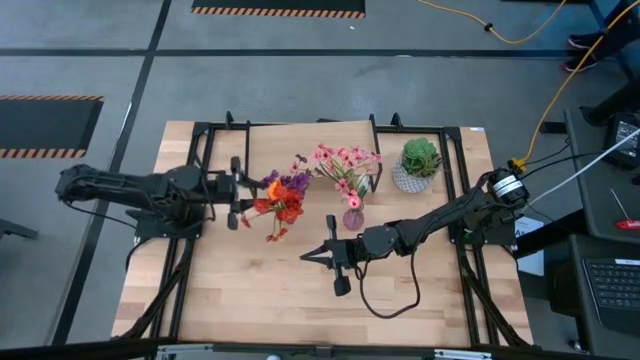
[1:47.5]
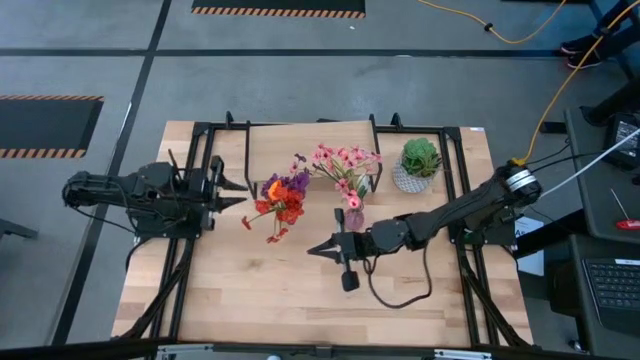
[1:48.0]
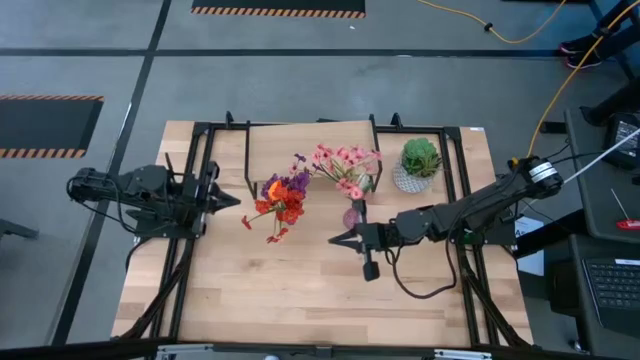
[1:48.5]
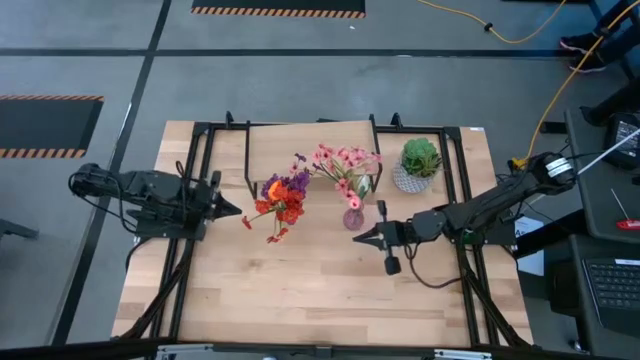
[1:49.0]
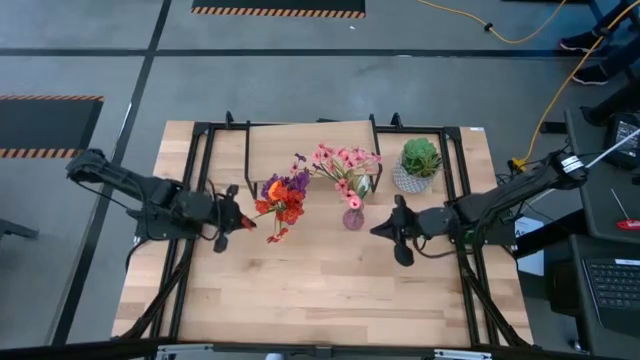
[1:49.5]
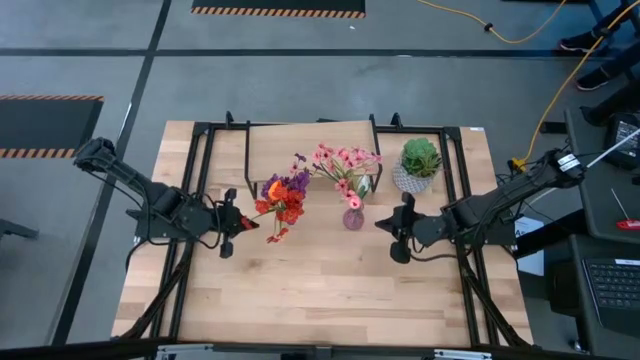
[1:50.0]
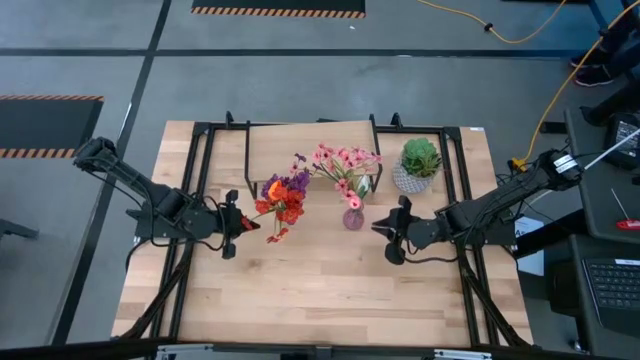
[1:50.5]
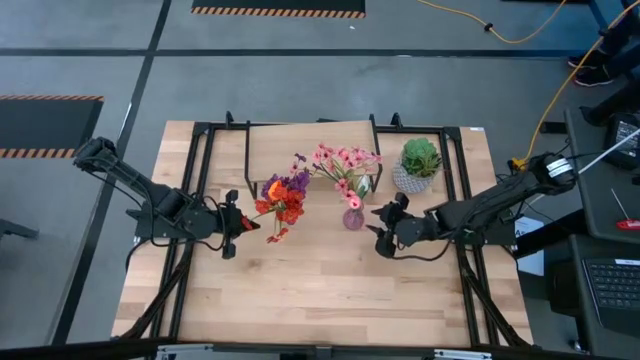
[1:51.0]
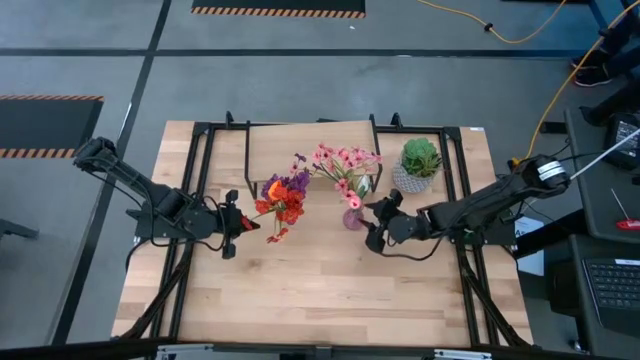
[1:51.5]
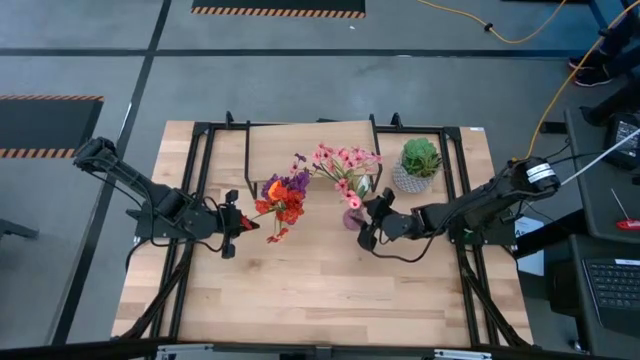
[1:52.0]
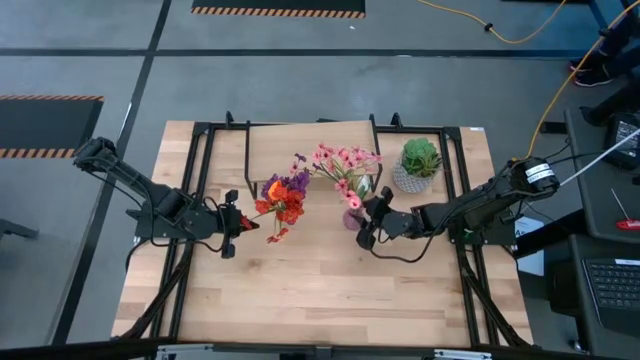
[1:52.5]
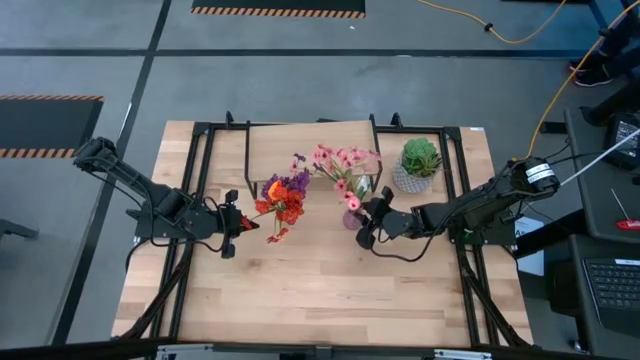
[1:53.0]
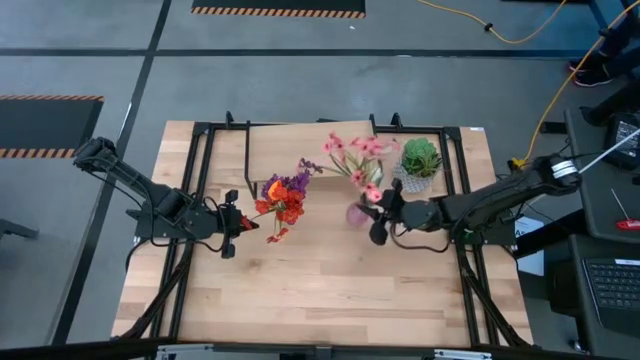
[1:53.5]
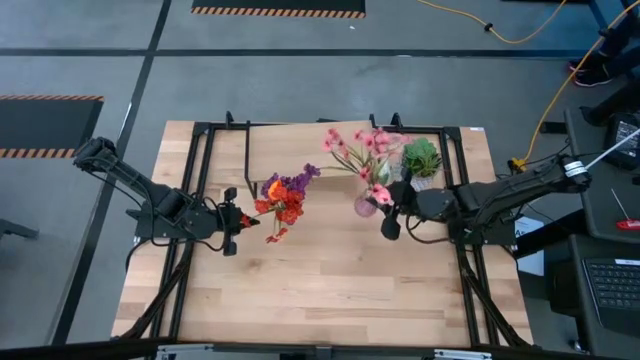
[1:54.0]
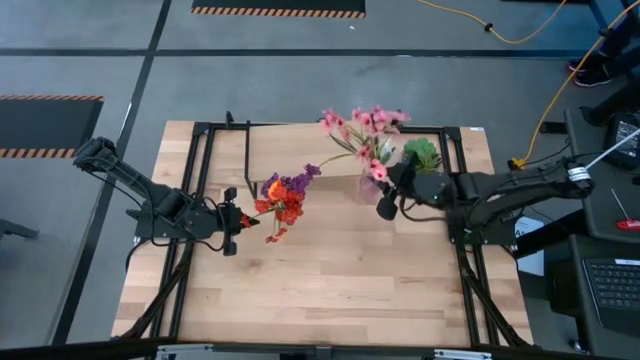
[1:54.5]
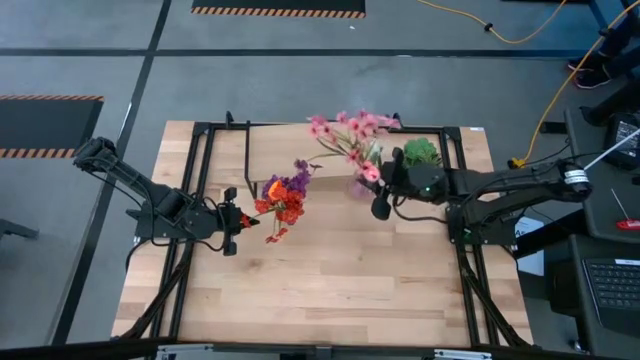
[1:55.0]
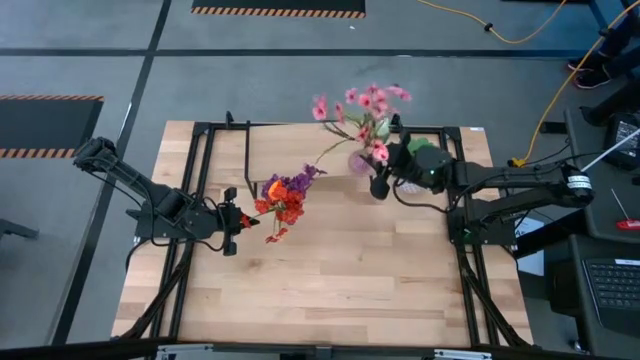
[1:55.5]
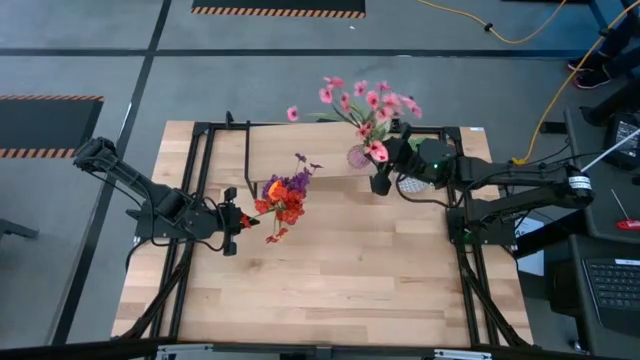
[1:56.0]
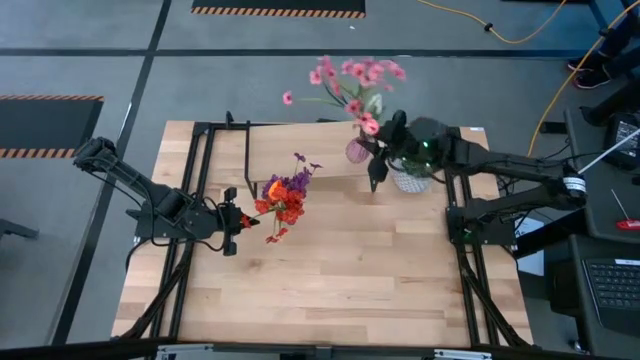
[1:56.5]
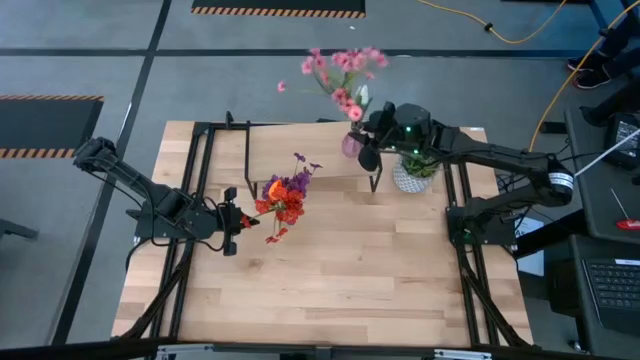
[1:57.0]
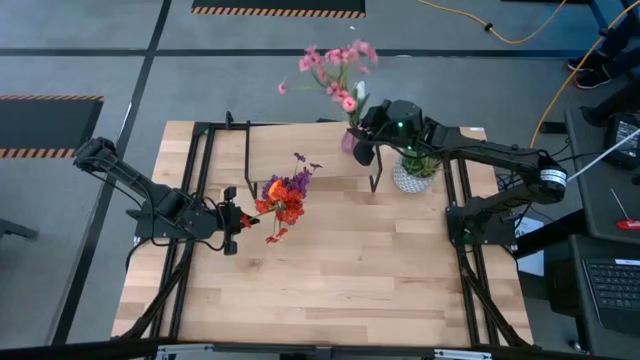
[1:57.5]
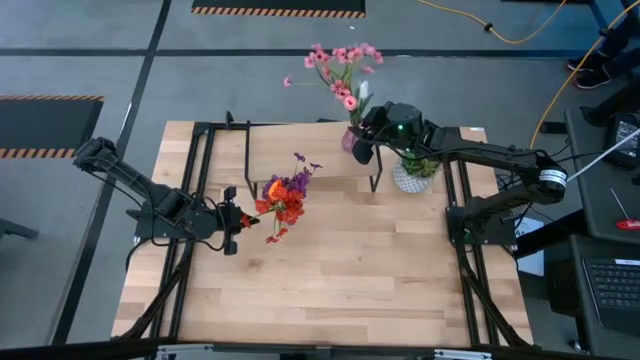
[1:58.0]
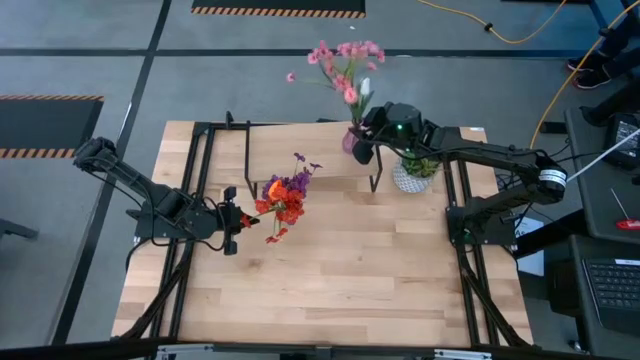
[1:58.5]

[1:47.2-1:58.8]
Task: Pick and place flowers into a vace then onto a shelf
Put the pink vase on the shelf

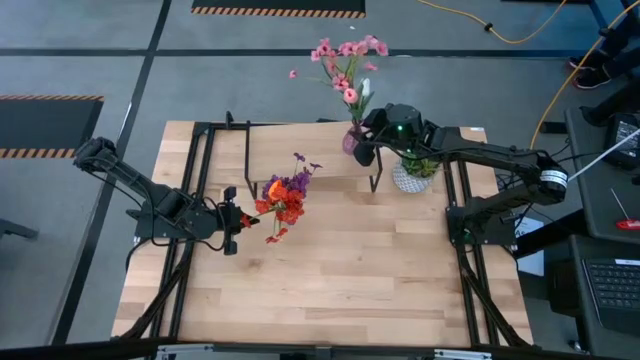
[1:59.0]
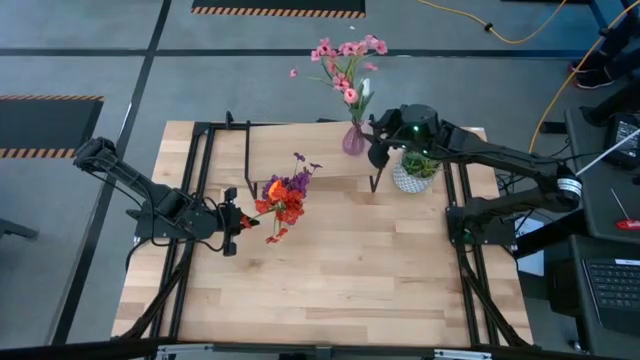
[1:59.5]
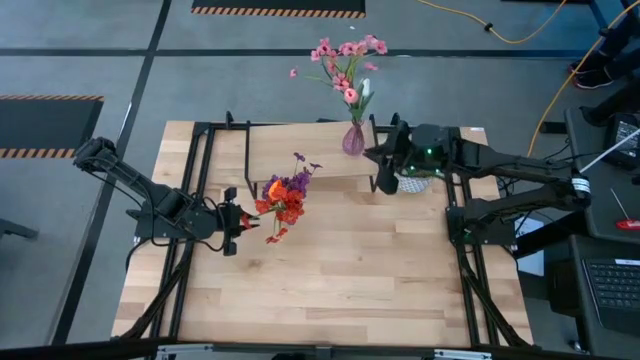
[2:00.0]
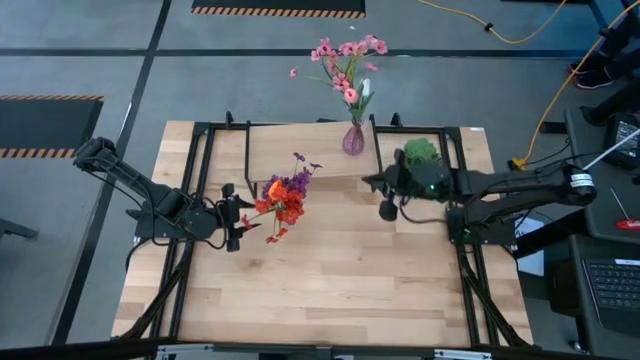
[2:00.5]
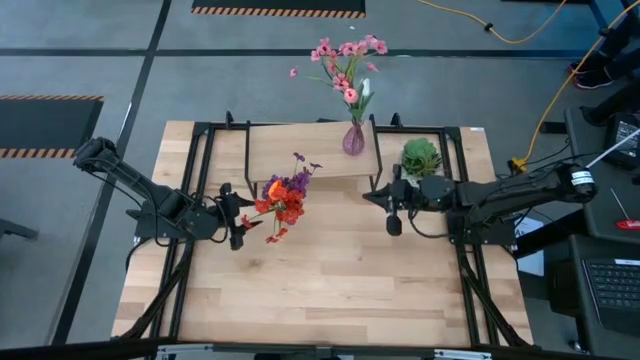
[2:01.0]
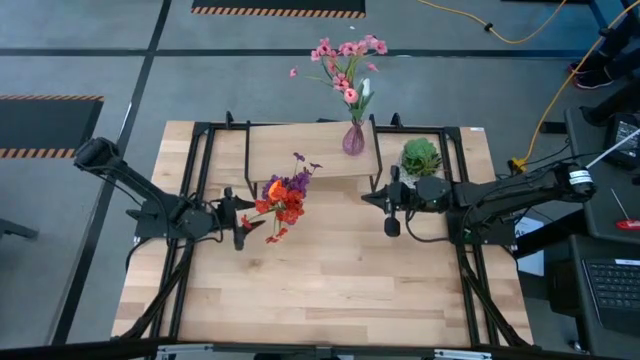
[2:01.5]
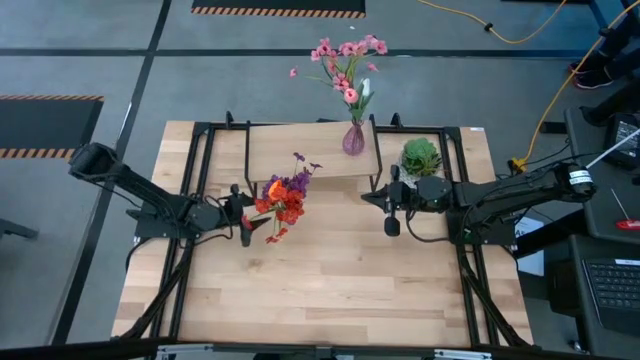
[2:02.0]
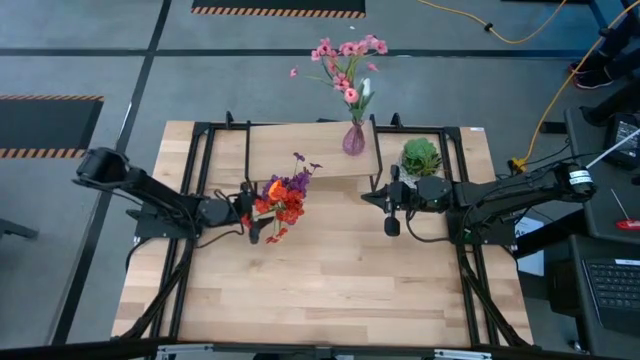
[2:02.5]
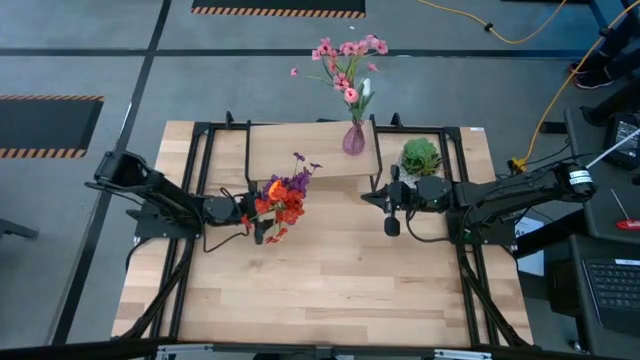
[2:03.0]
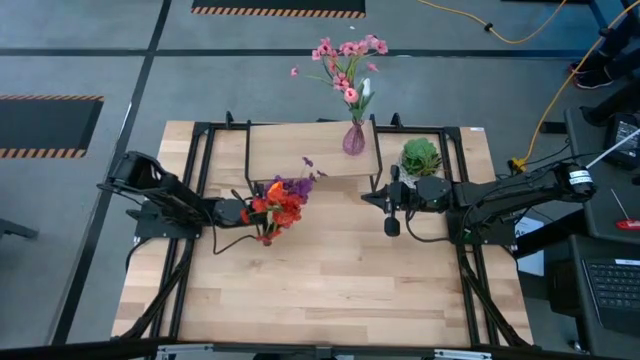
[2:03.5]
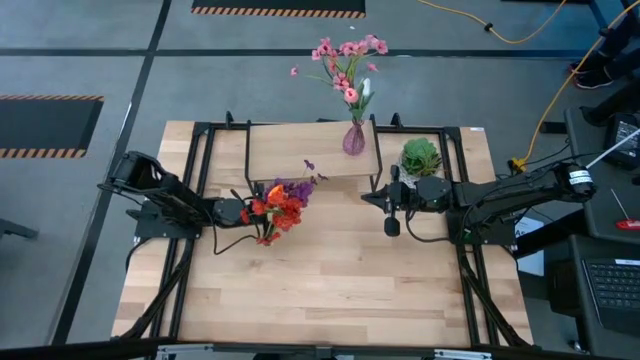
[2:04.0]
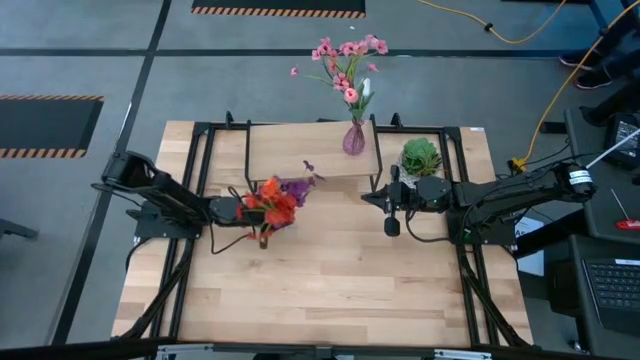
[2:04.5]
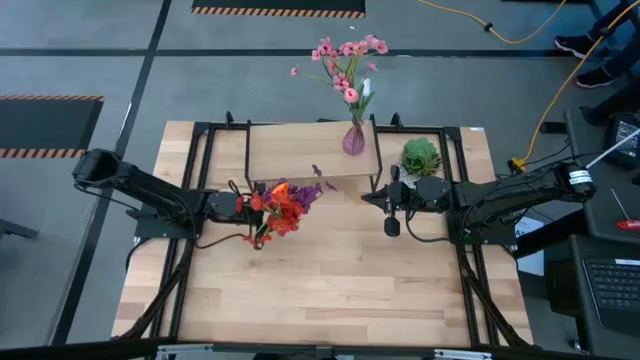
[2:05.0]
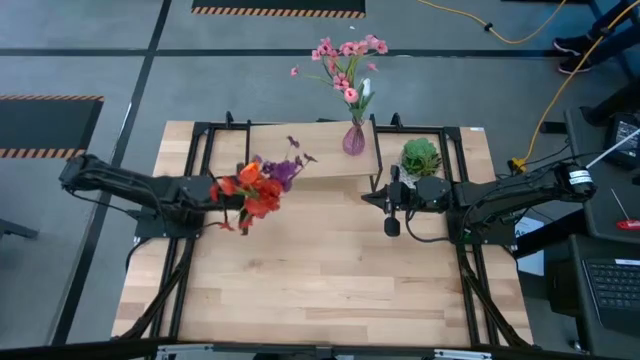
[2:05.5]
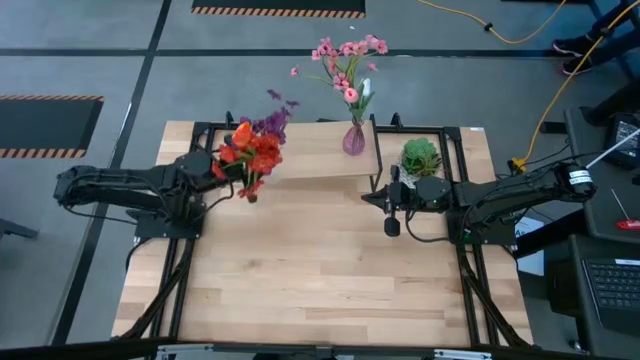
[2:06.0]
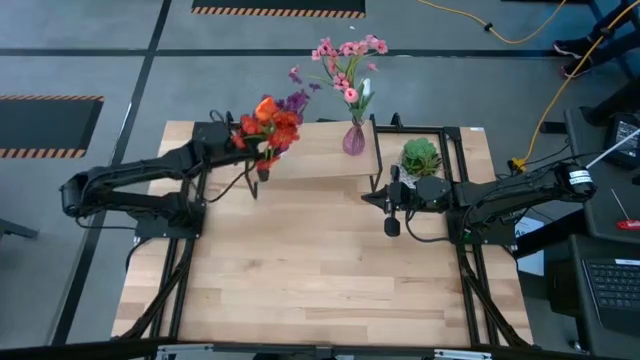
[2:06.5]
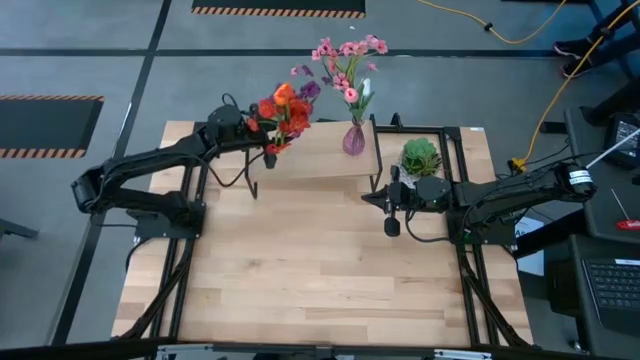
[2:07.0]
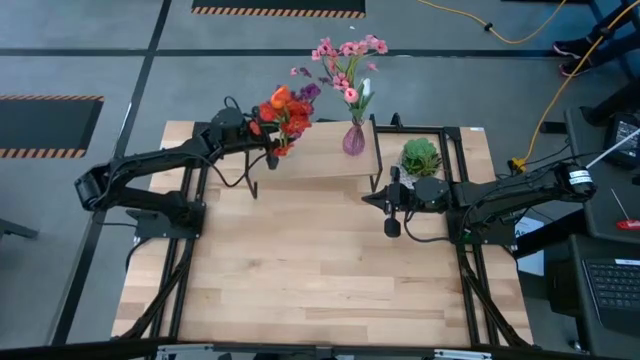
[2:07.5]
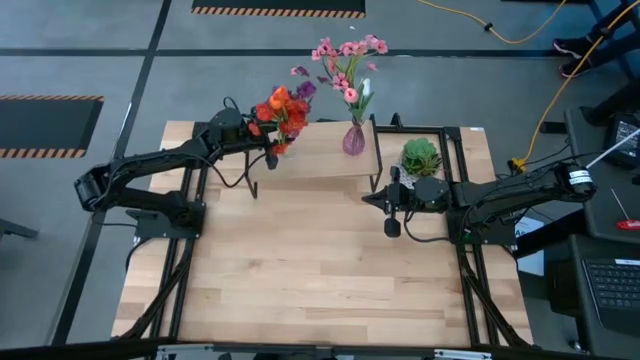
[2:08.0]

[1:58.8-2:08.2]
Put the transparent vase on the shelf
